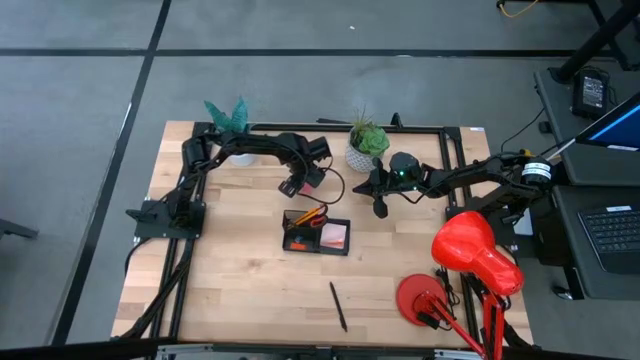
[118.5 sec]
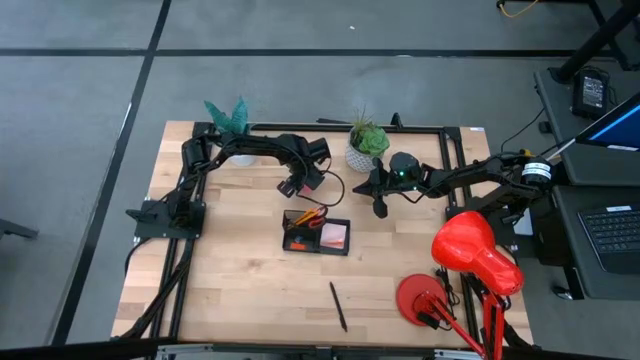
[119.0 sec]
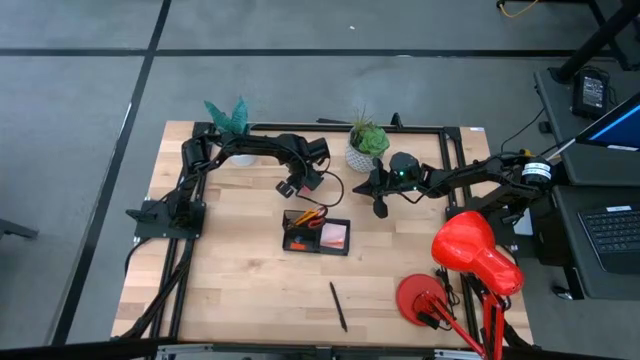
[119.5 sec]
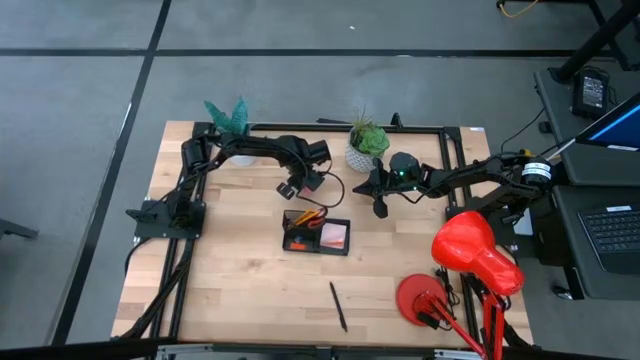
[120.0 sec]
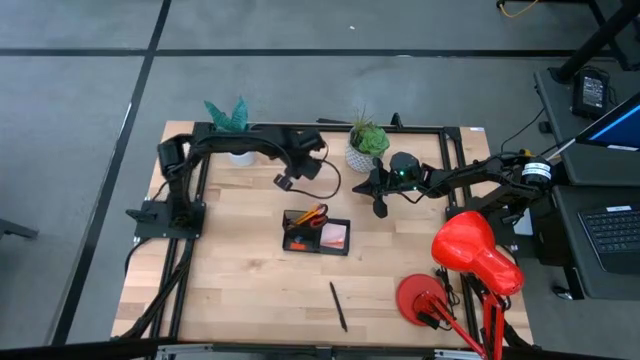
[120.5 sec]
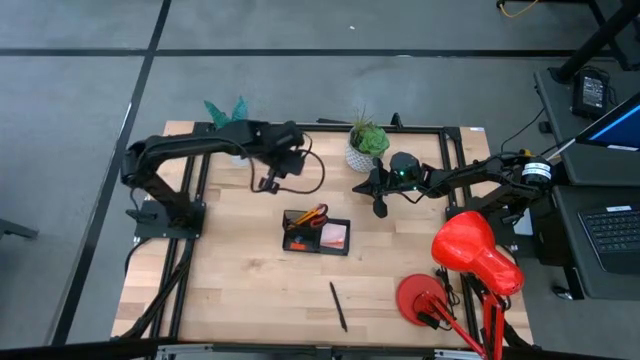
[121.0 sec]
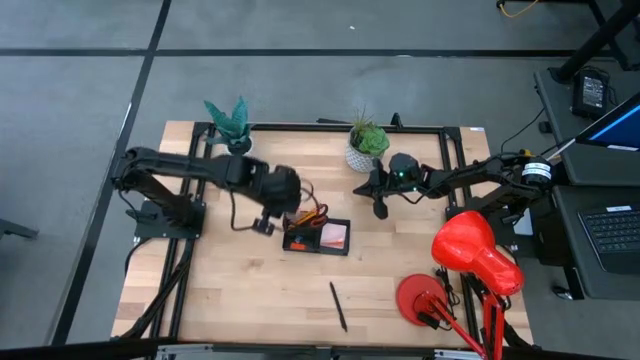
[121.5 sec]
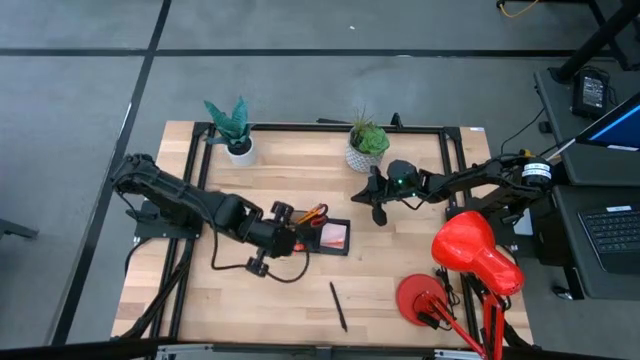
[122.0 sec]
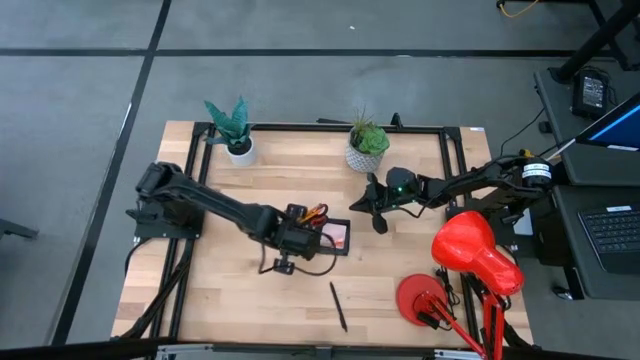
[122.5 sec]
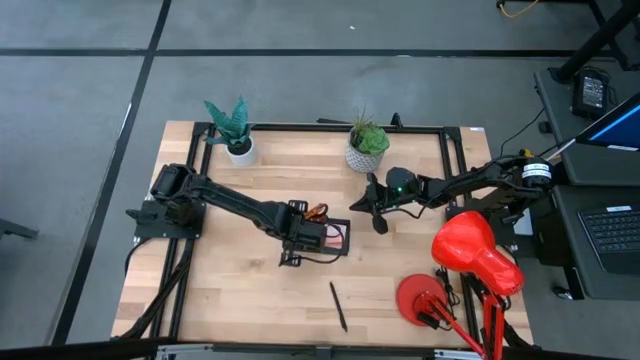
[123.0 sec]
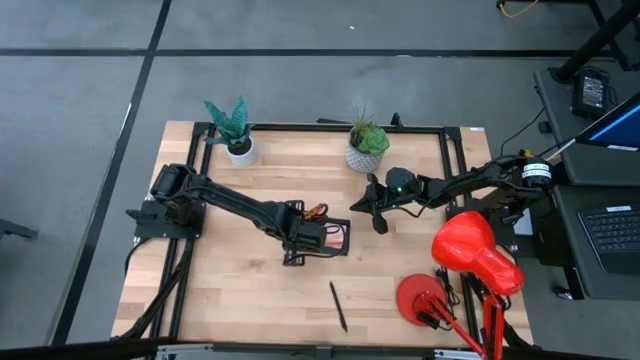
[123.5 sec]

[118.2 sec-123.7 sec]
Task: Pick and place office supplies into organizer
Put the pink eraser into the desk organizer

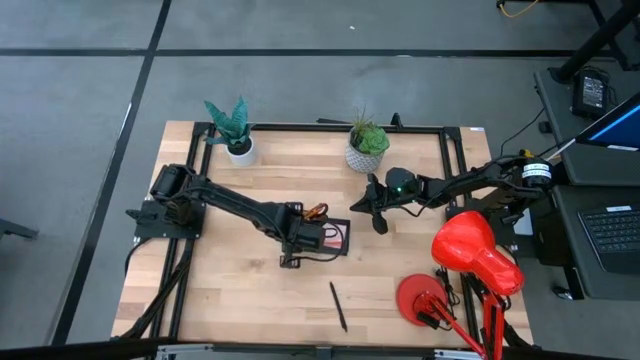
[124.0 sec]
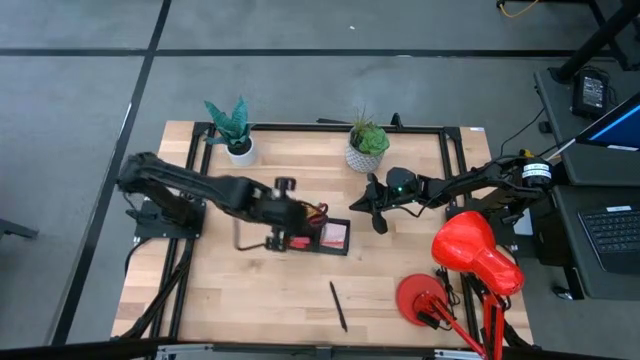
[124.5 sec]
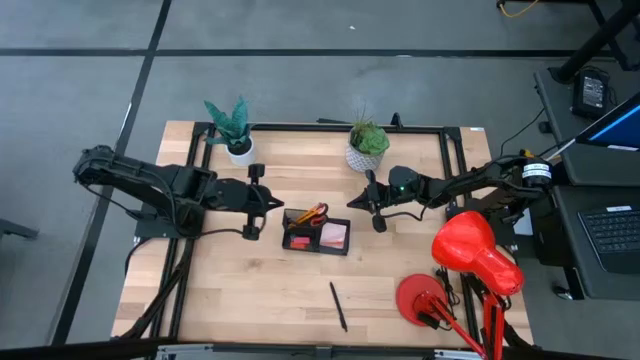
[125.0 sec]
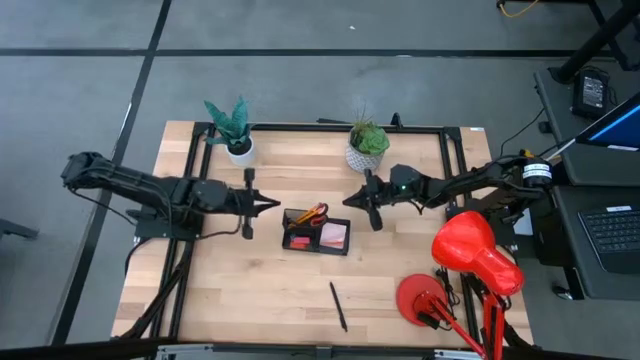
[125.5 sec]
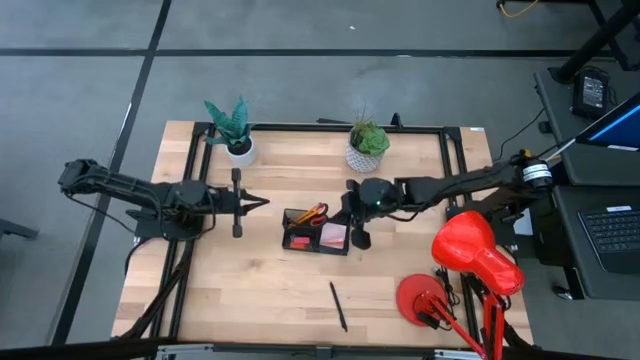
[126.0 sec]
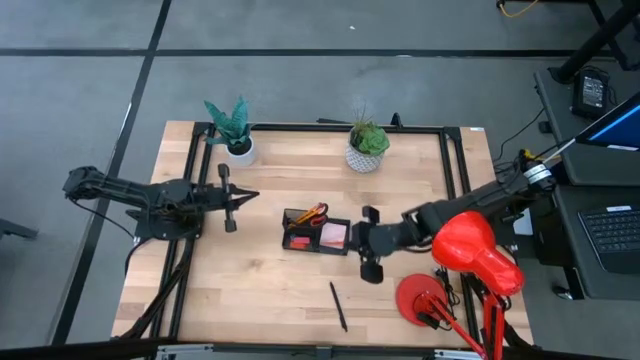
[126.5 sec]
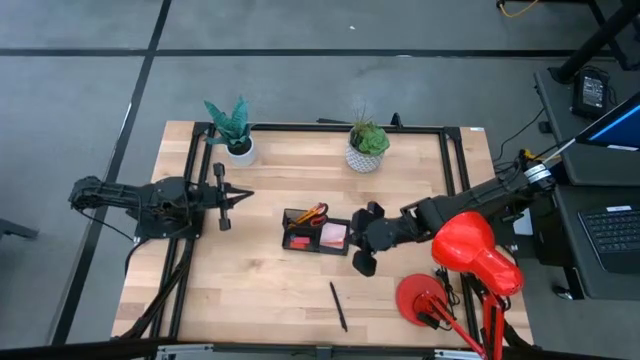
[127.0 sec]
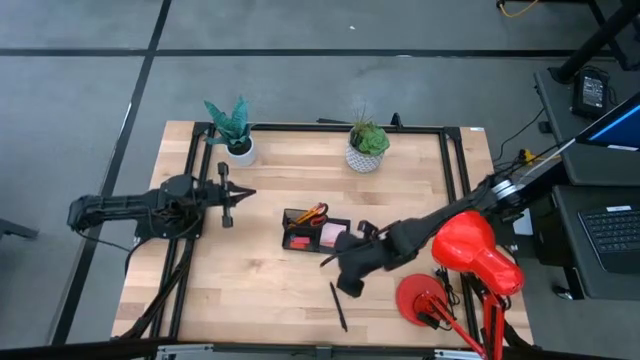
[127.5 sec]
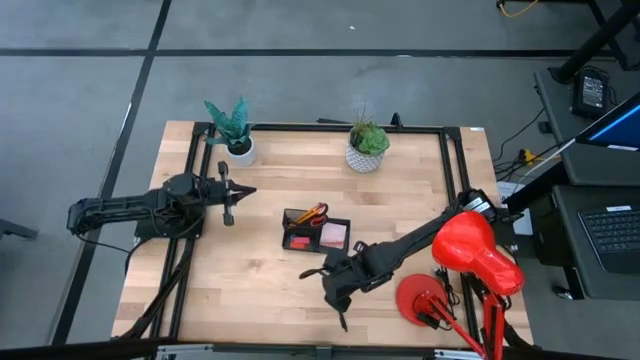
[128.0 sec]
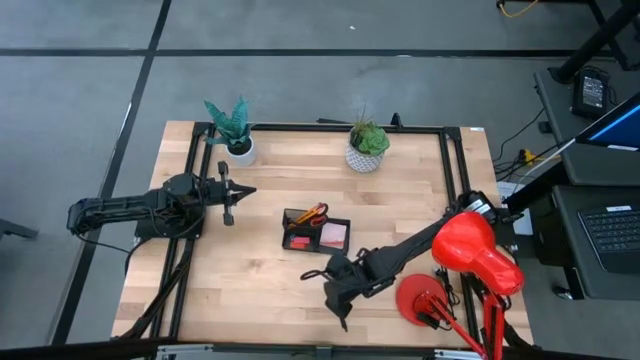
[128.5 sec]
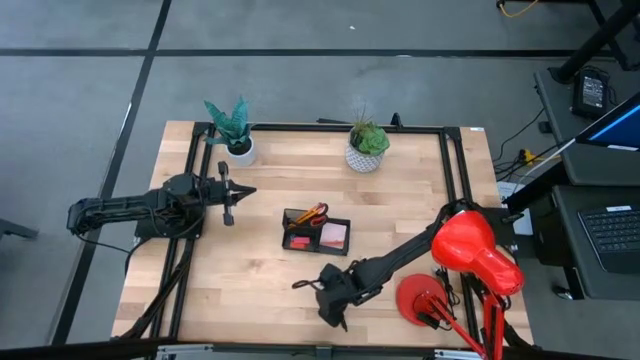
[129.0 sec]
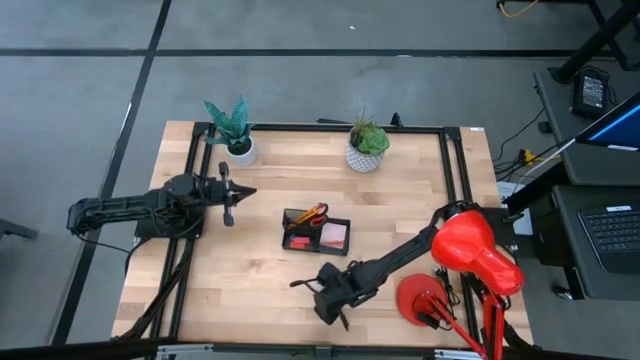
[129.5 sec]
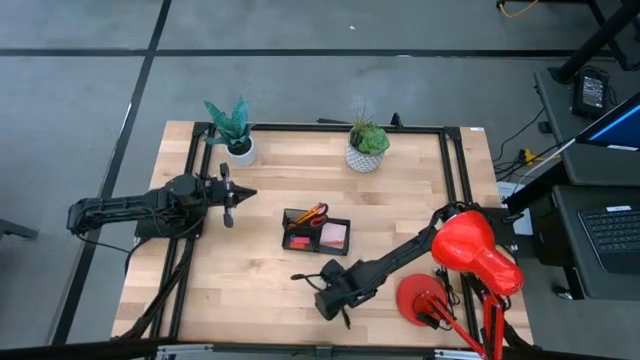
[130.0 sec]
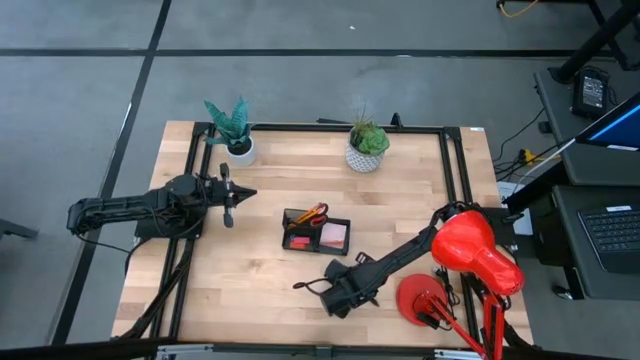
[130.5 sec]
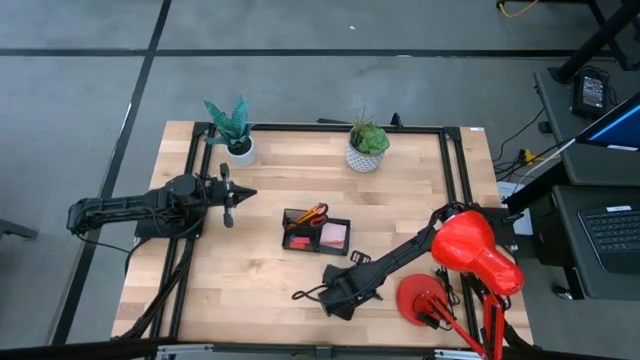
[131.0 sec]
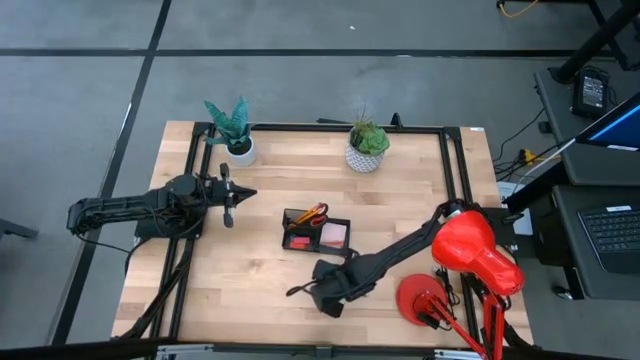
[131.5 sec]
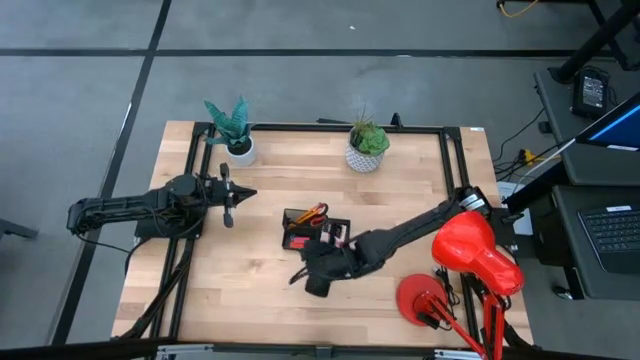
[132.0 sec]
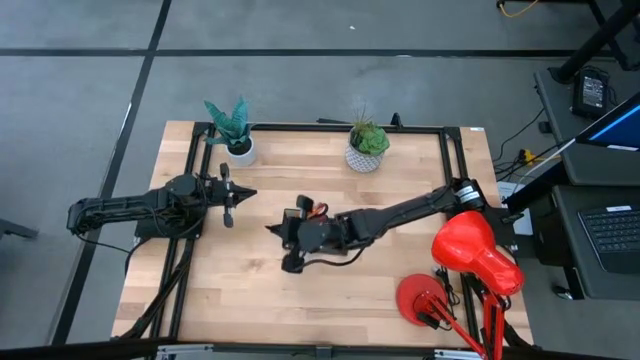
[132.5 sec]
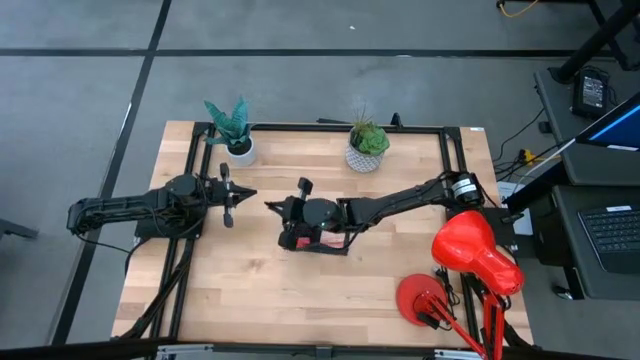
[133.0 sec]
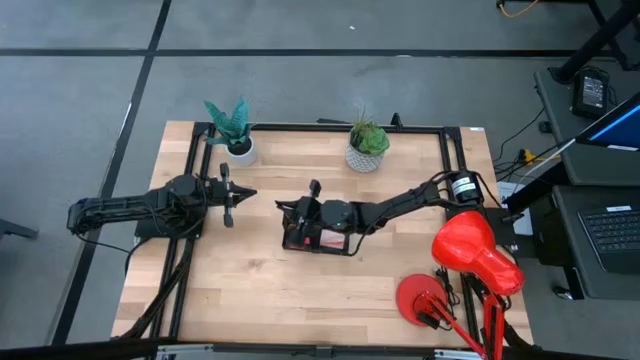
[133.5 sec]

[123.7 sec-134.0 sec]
Put the black pen into the desk organizer

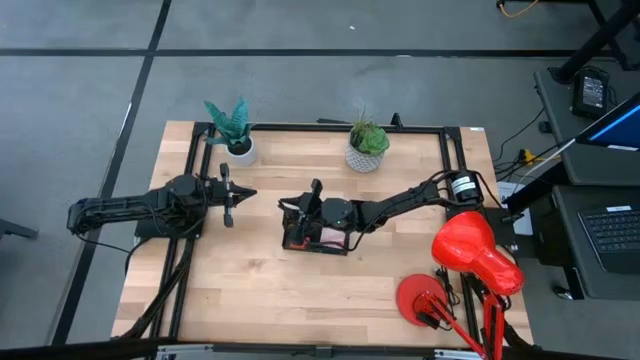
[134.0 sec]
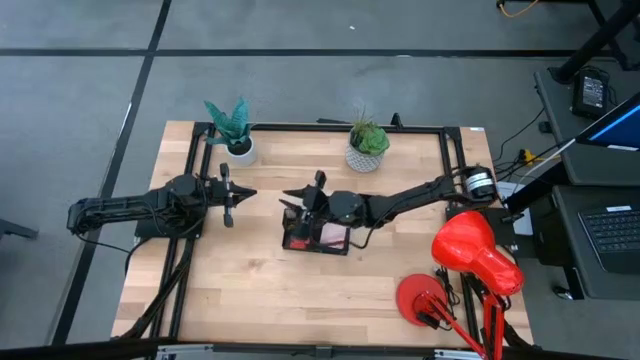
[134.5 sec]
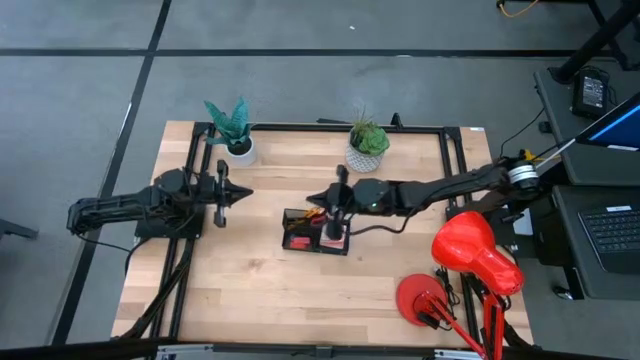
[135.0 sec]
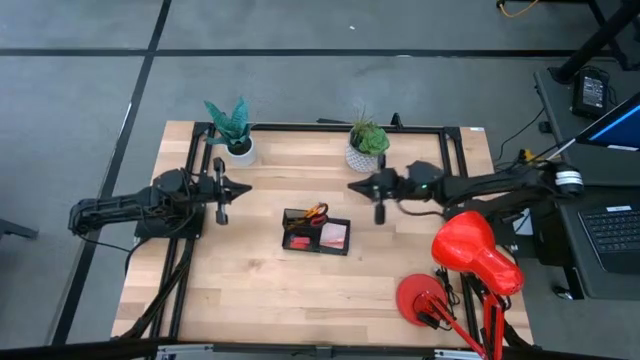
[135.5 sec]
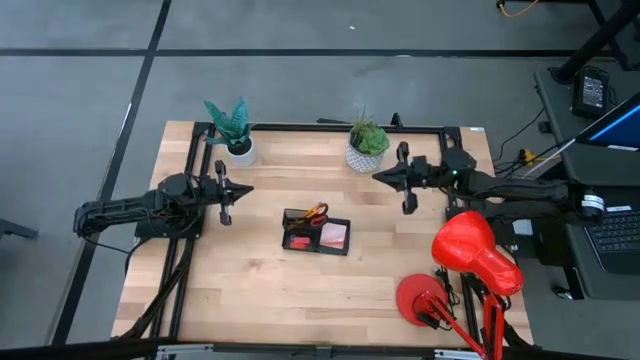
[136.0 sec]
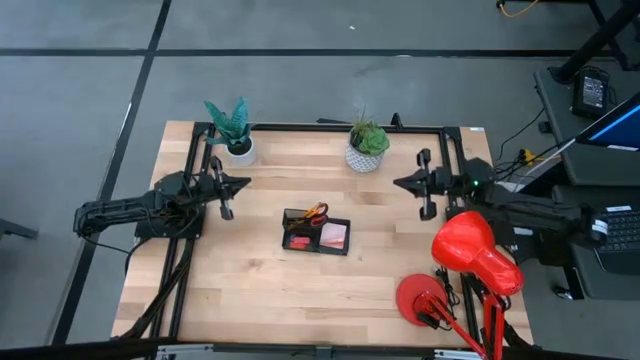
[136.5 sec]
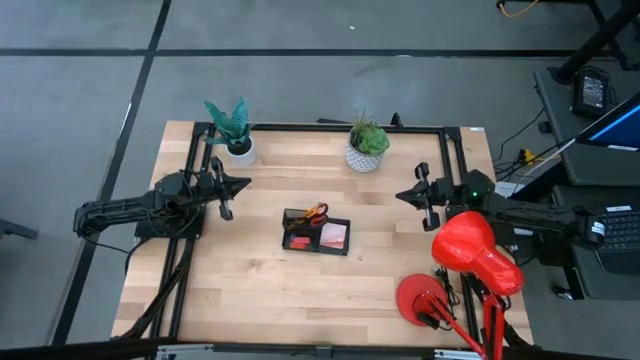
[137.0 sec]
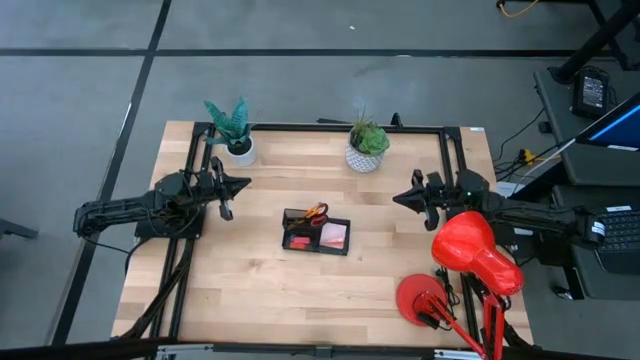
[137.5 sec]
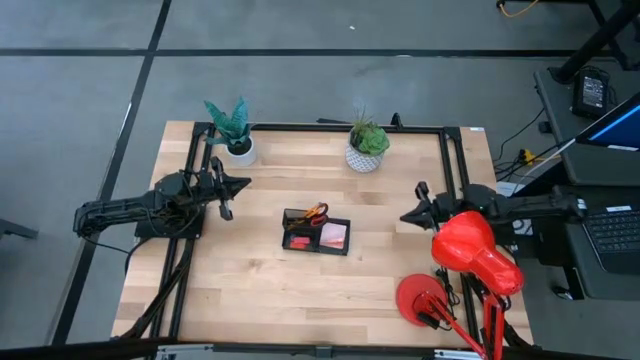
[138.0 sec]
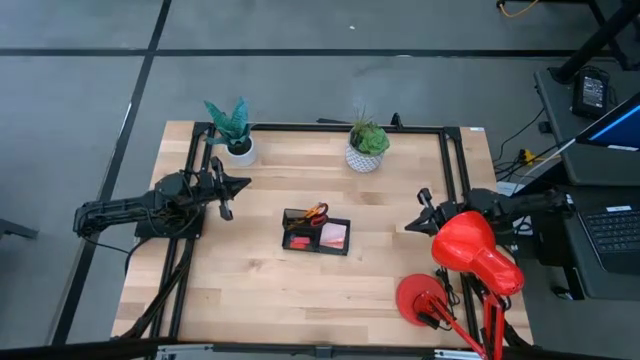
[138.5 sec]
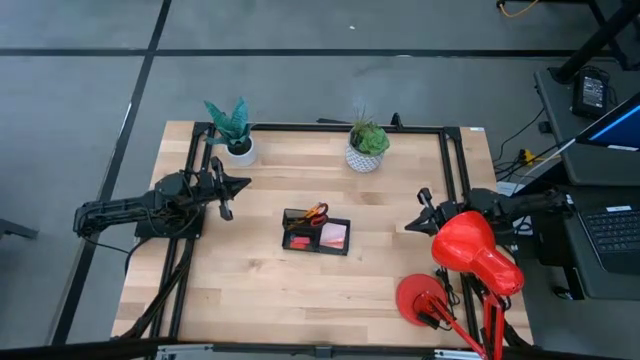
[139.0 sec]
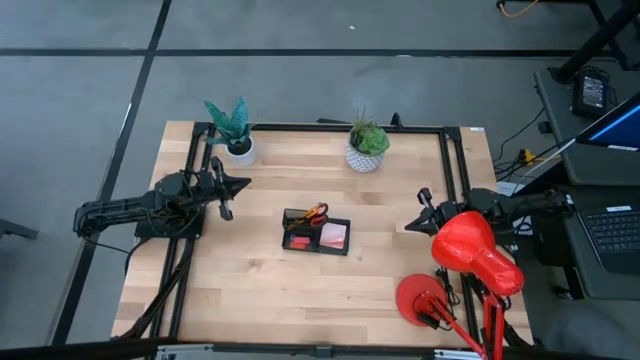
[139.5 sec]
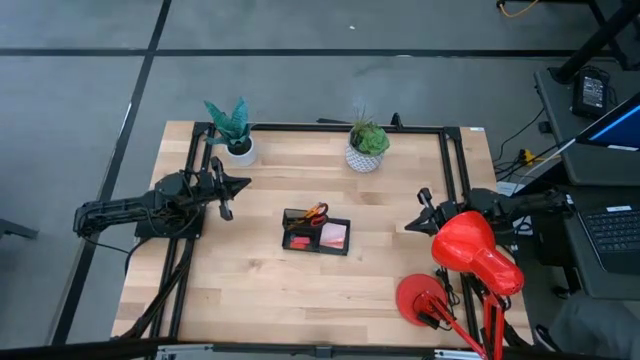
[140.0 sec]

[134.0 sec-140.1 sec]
Return to Home Position
